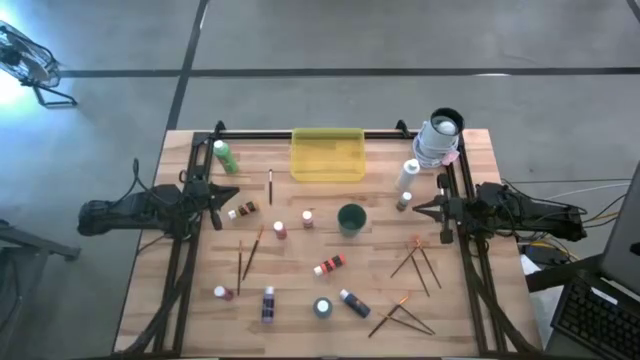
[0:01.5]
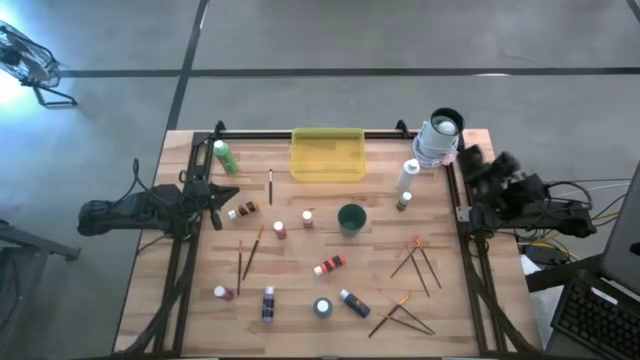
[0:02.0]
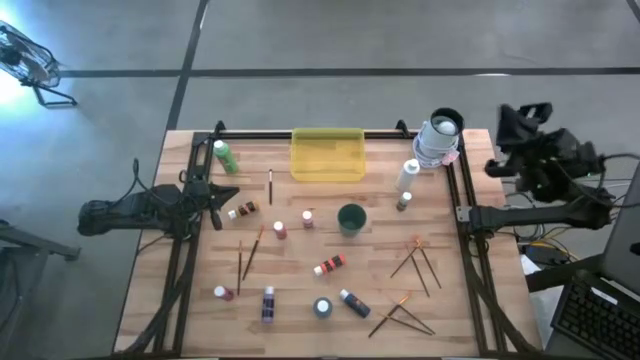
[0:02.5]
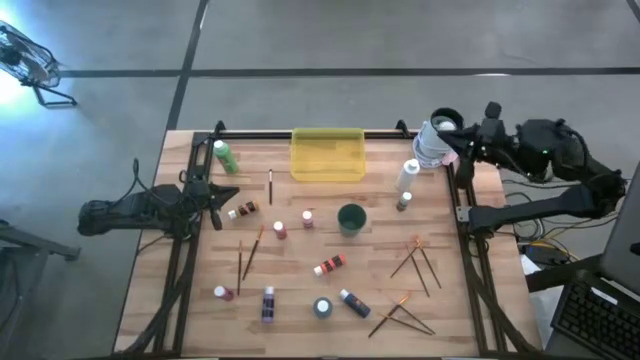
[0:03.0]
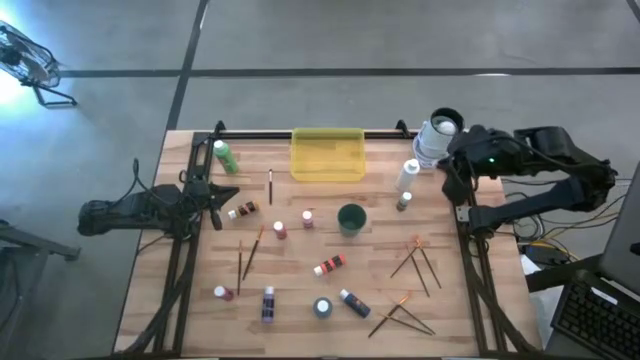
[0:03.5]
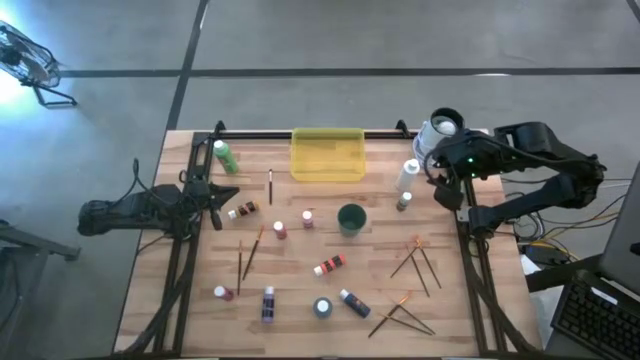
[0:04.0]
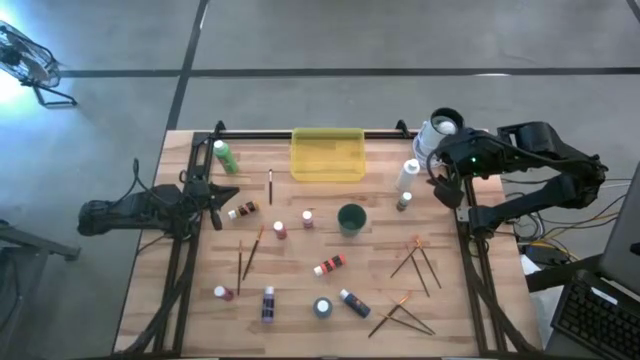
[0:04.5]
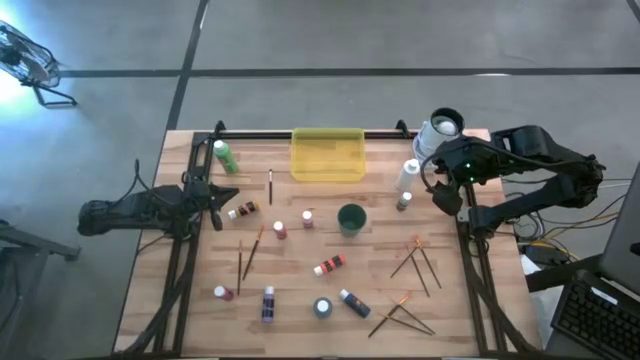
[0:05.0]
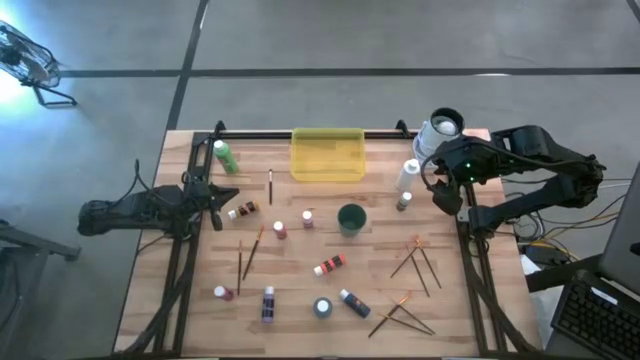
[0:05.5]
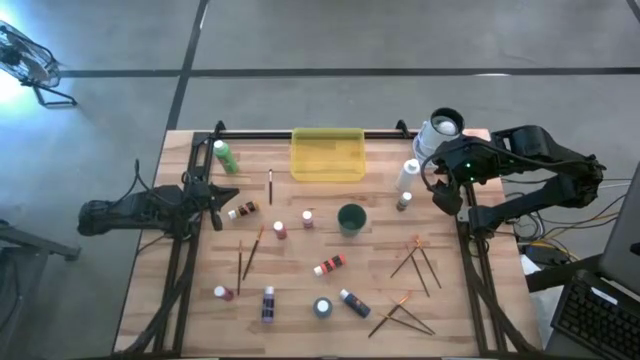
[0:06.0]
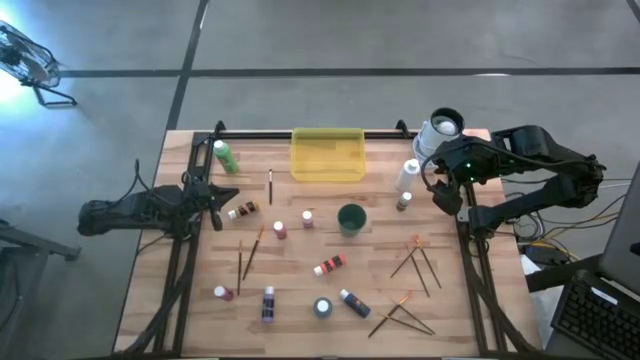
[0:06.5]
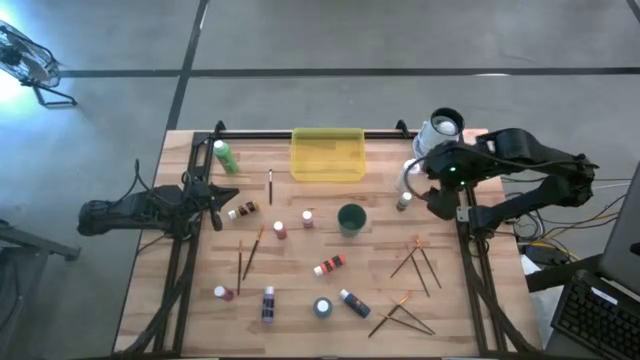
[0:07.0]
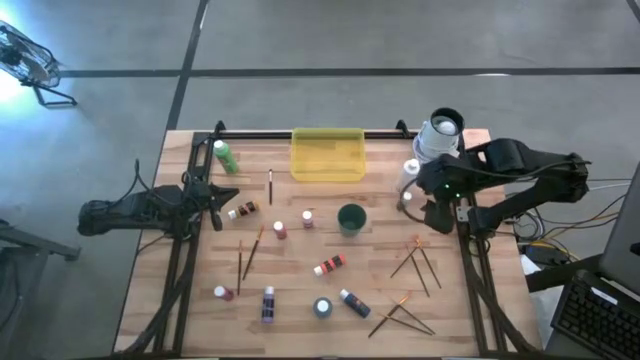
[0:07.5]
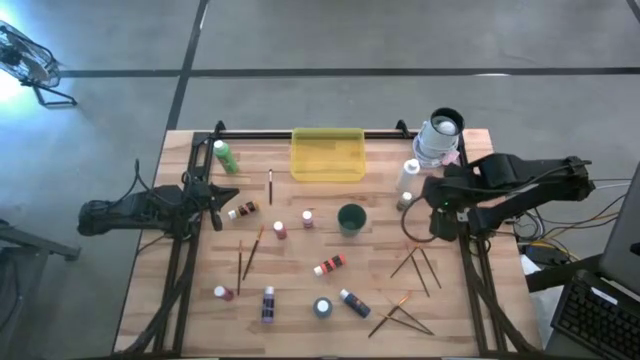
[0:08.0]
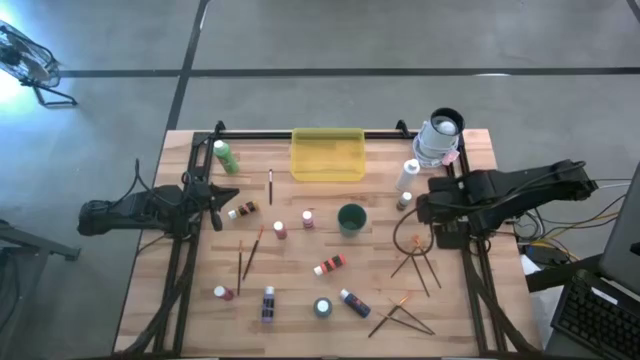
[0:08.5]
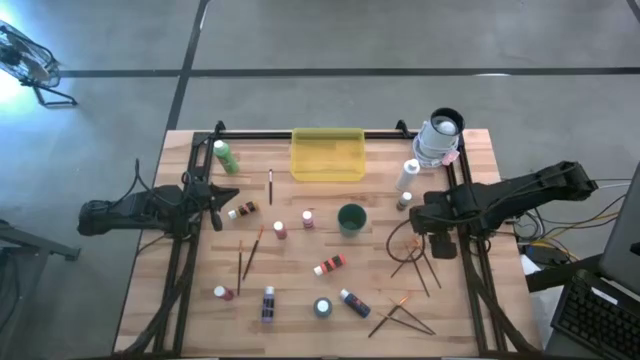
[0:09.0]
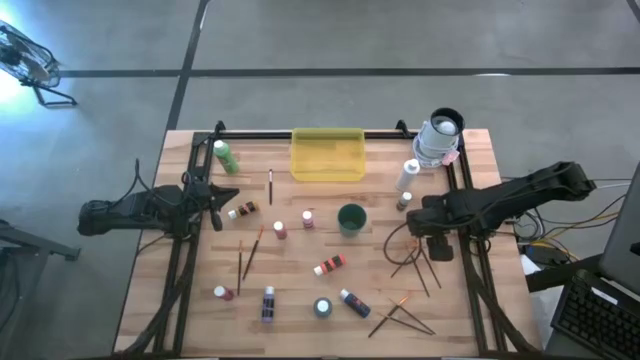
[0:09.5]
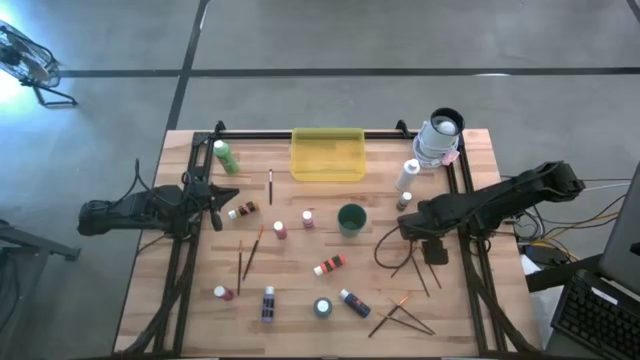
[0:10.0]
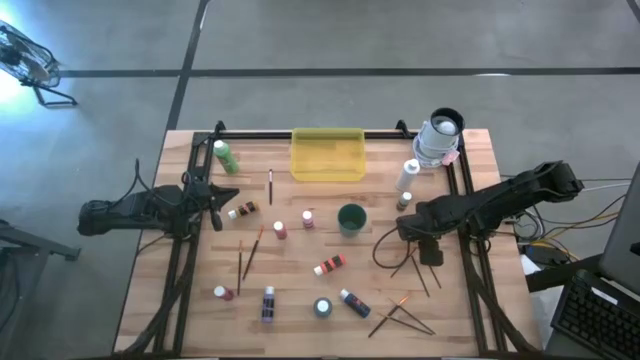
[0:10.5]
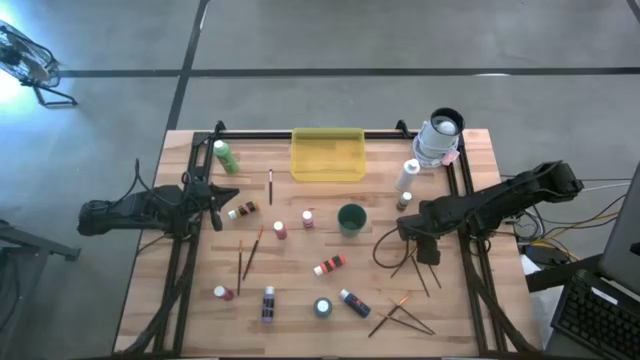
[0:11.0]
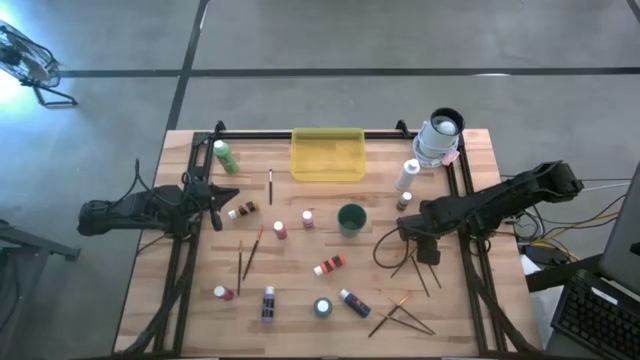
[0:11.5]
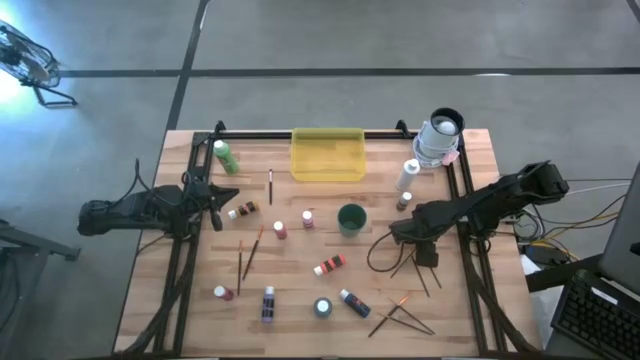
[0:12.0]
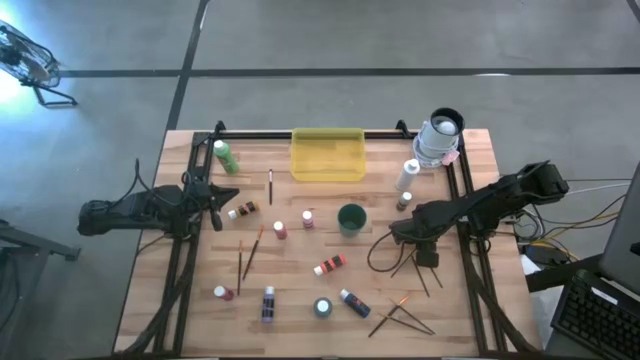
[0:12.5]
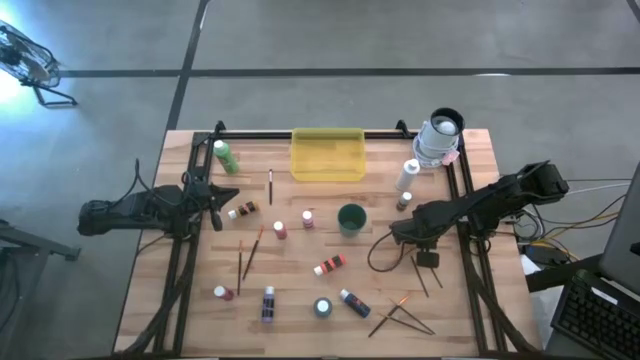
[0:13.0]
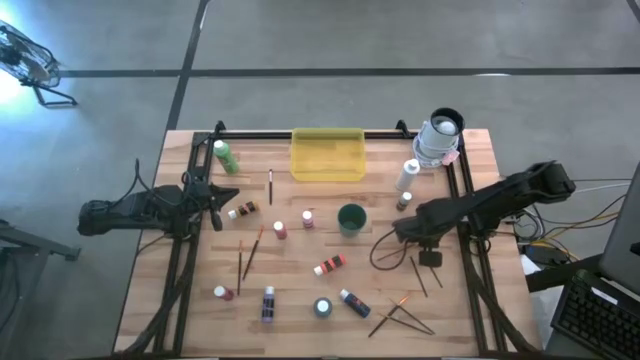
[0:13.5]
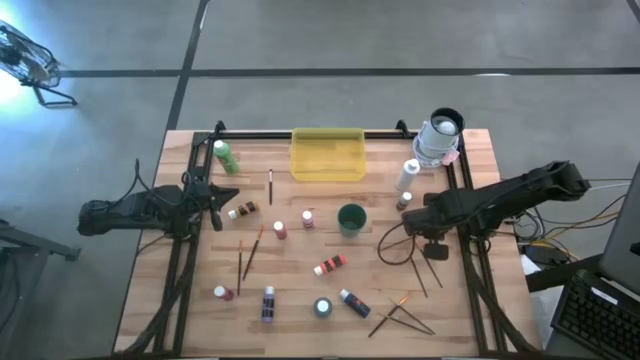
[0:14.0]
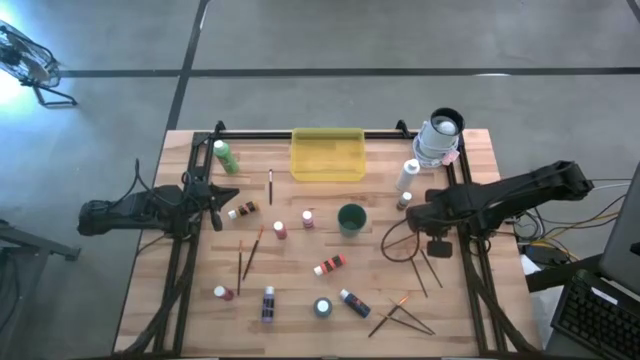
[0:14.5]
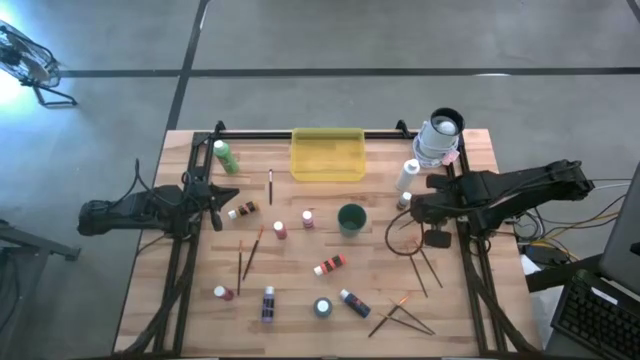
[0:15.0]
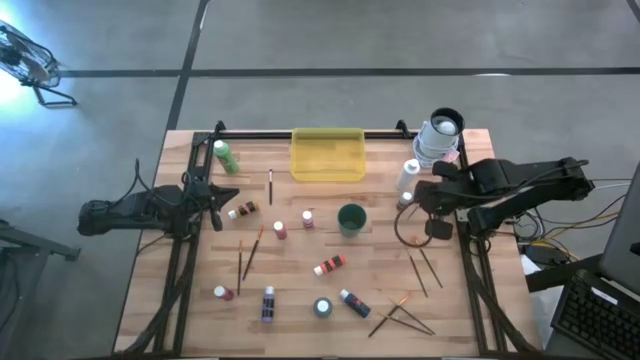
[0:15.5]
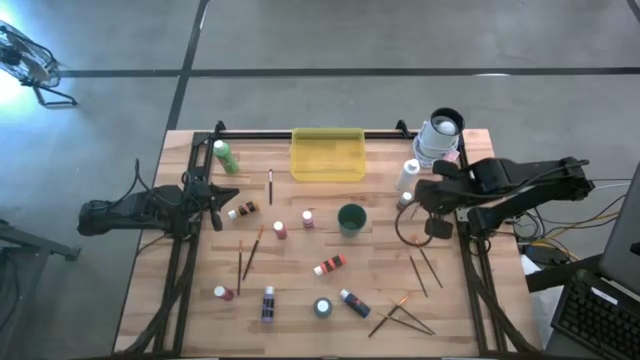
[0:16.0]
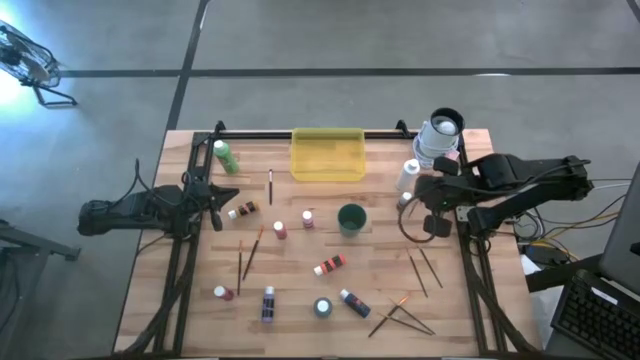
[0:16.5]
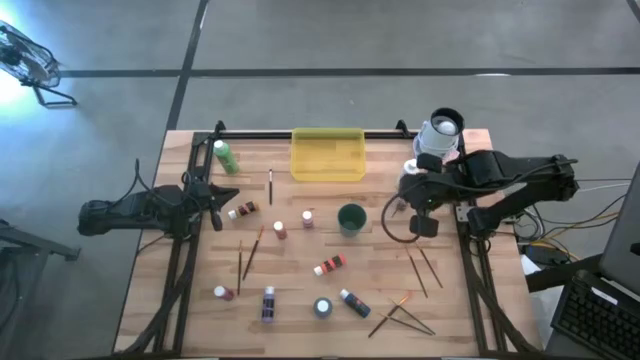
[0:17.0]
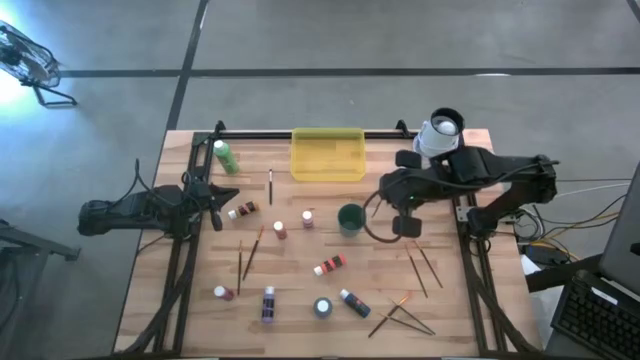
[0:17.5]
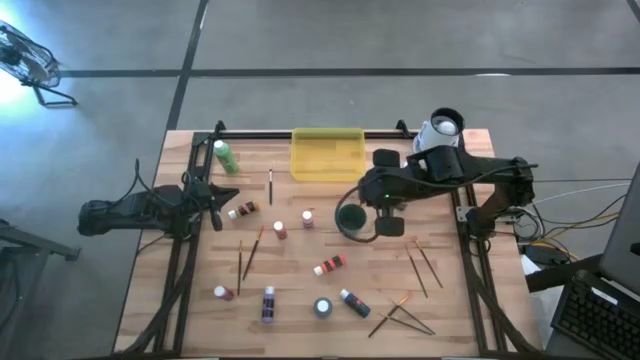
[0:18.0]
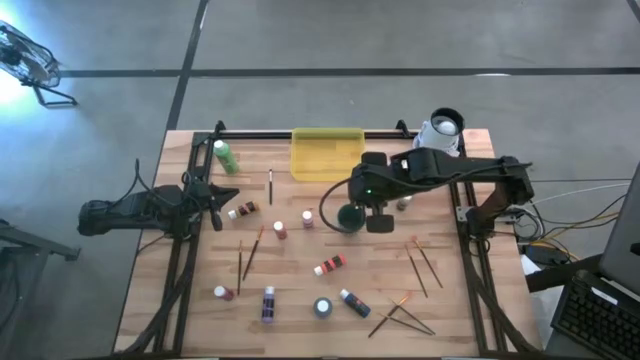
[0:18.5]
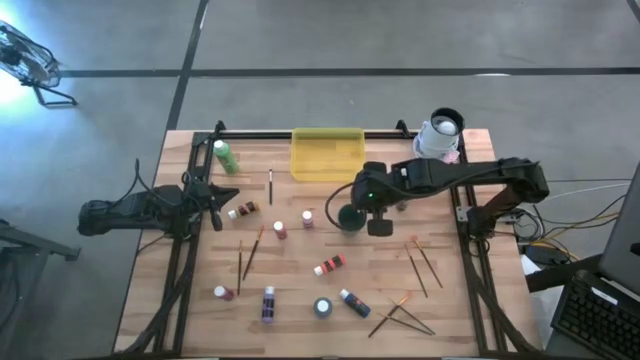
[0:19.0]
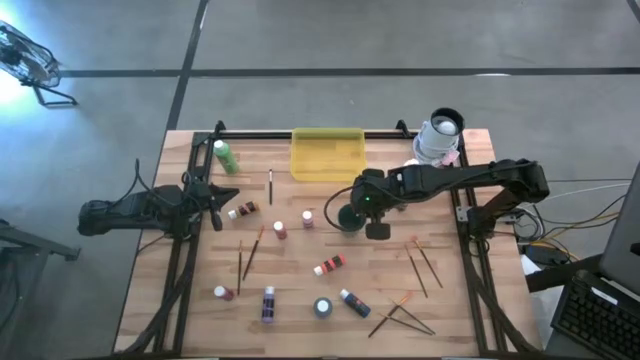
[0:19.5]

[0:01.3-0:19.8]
Task: Pick & Place Paint Supplies
Put the gold paint brush into the green cup
